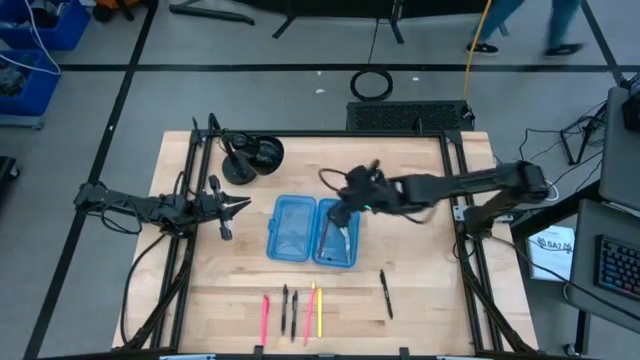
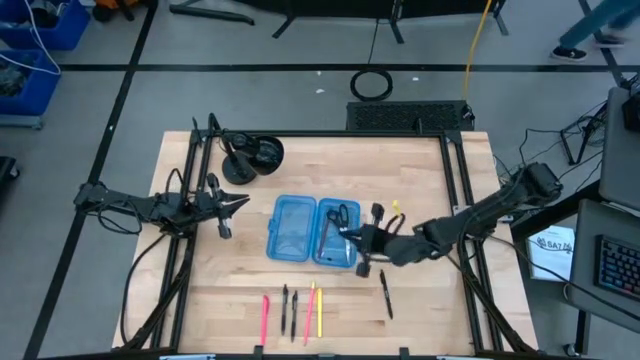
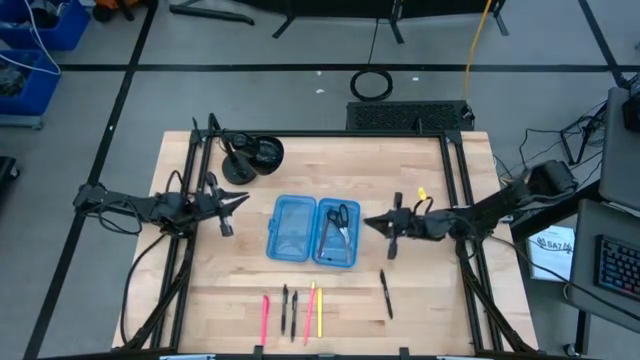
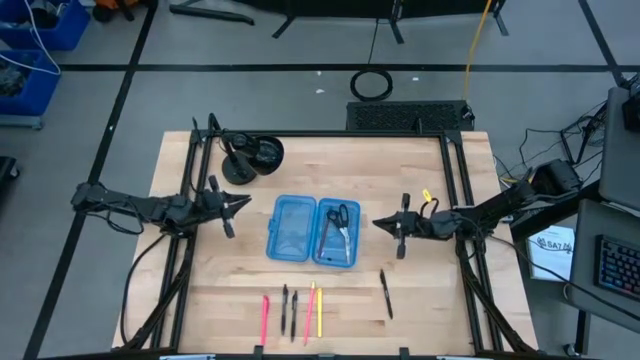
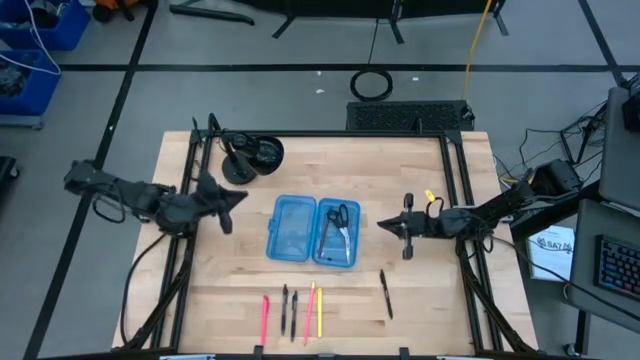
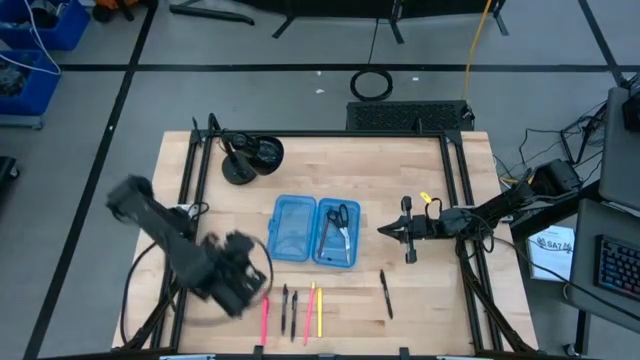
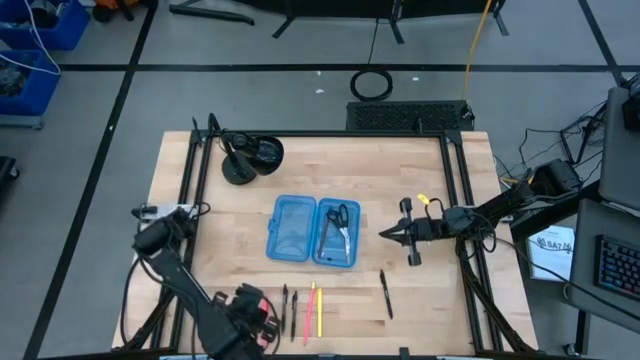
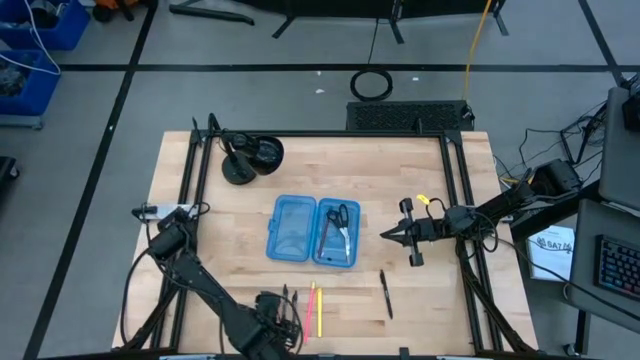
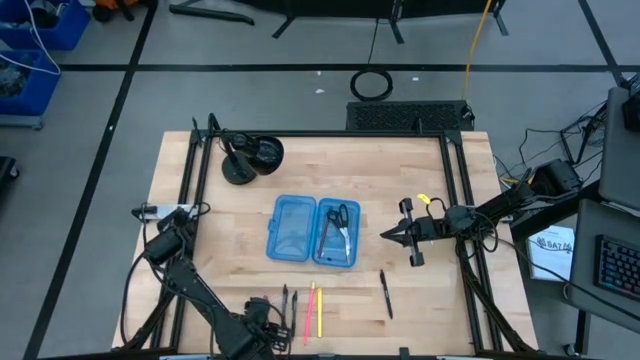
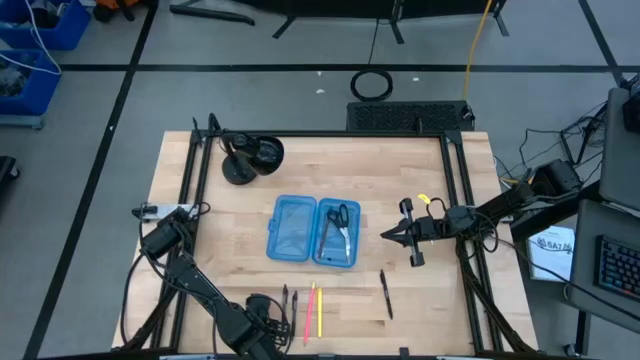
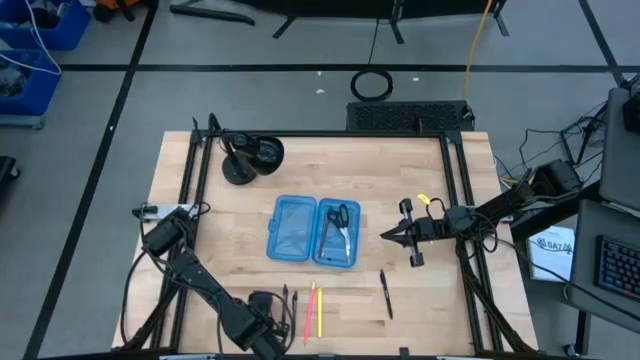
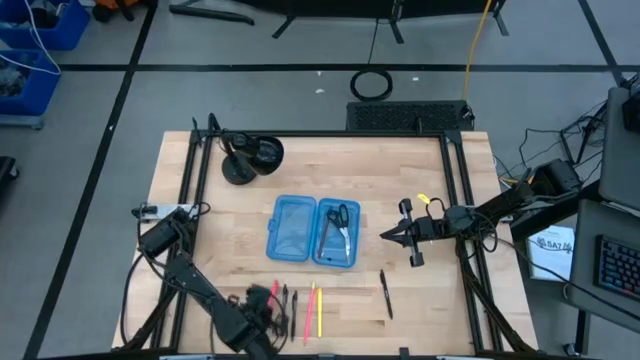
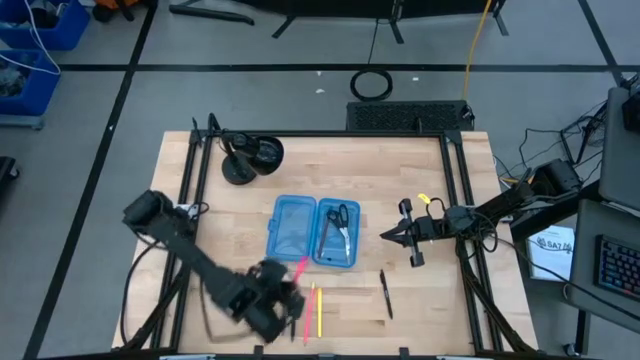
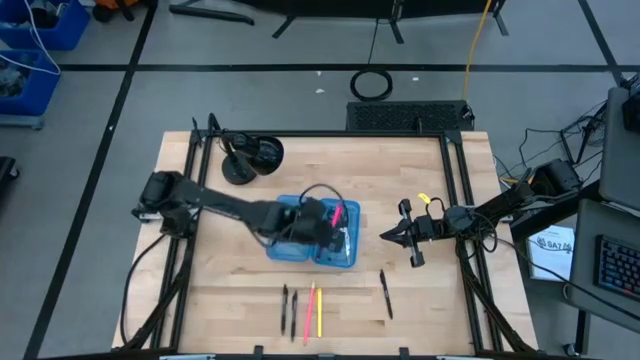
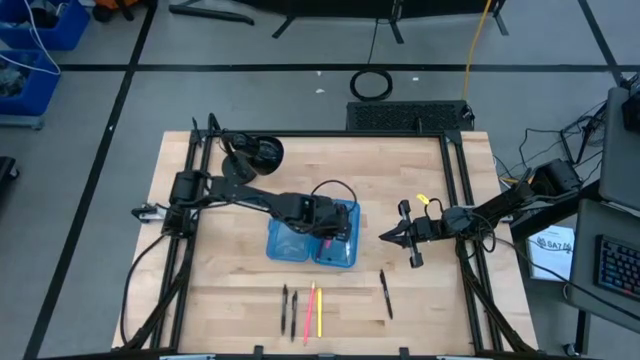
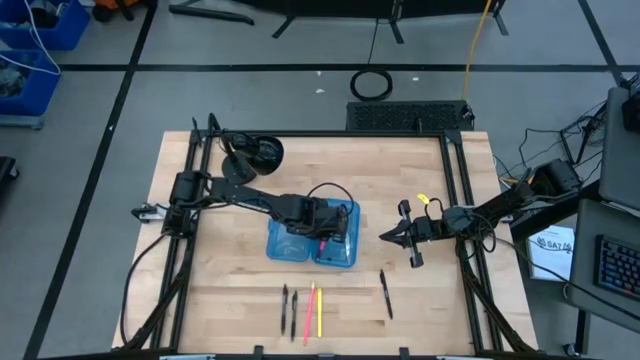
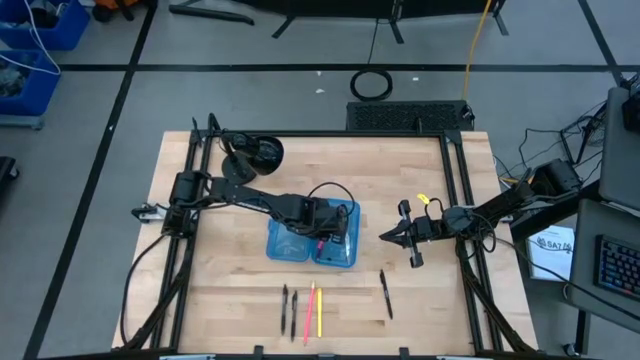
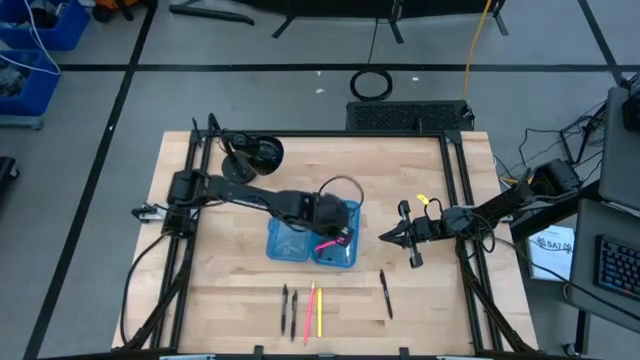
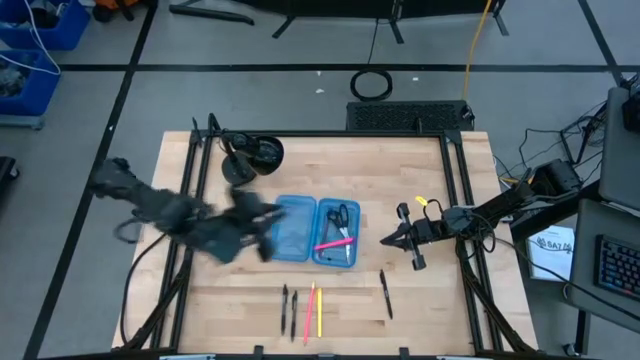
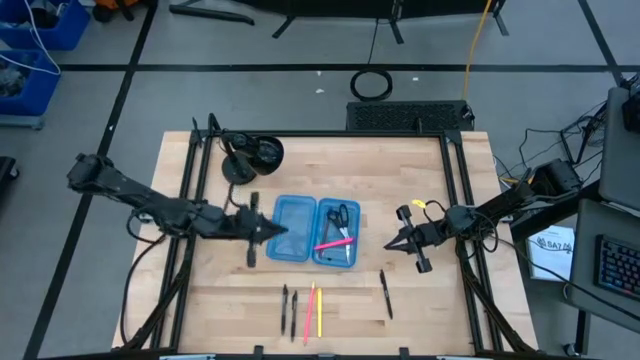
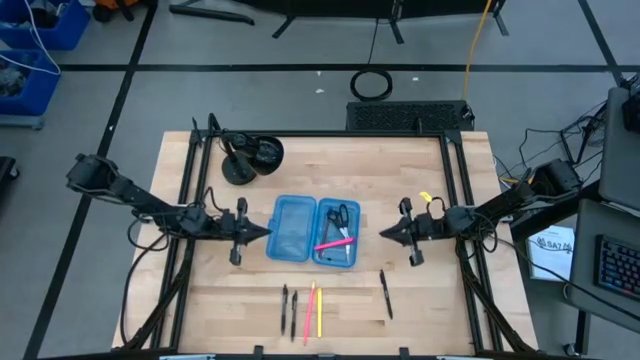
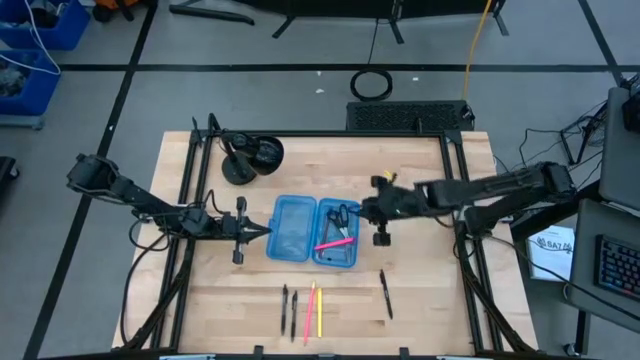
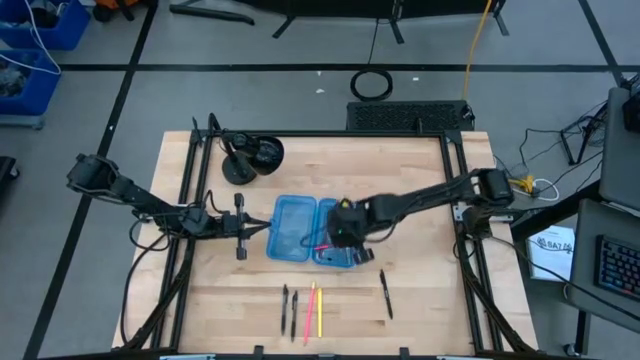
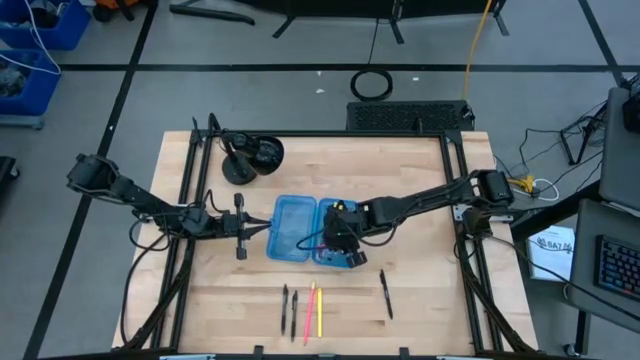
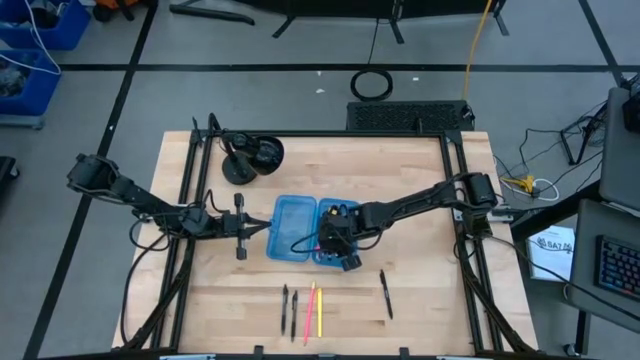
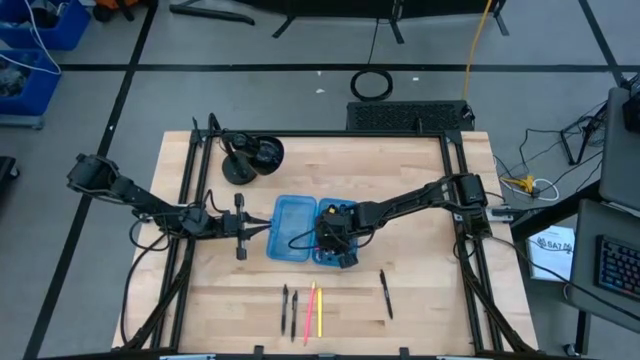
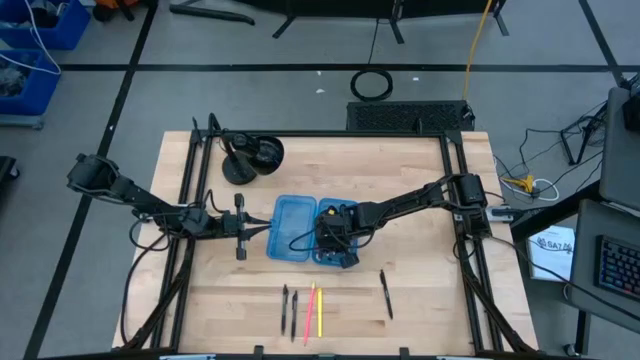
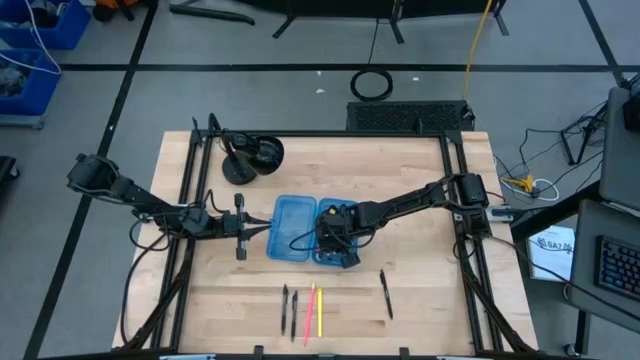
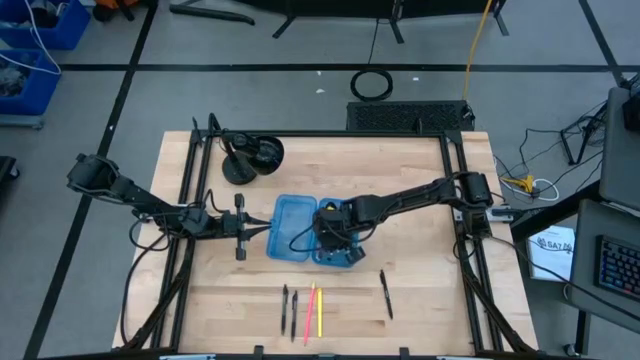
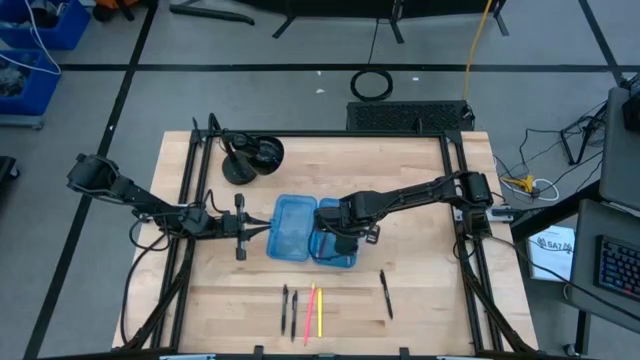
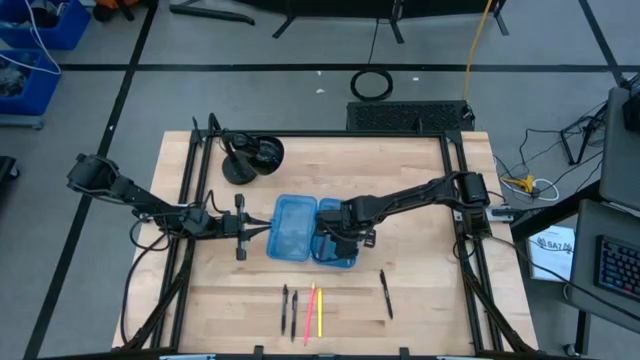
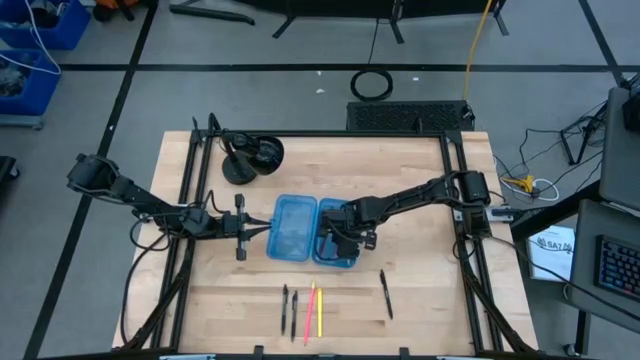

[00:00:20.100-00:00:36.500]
Task: Pick & place school supplies into a supply box
Put the pink pen into the blue box

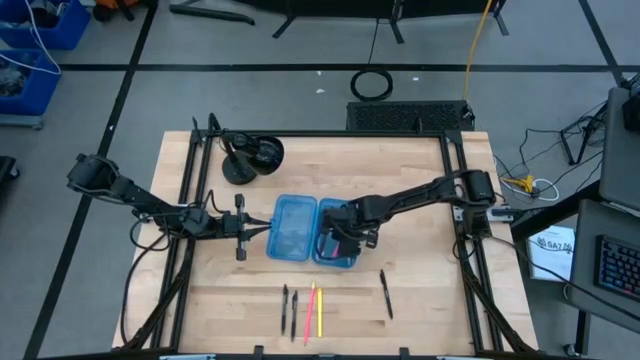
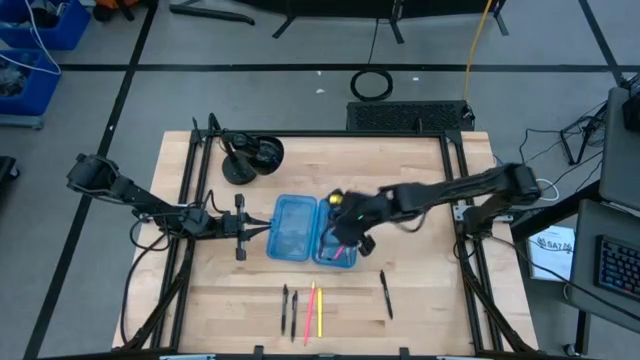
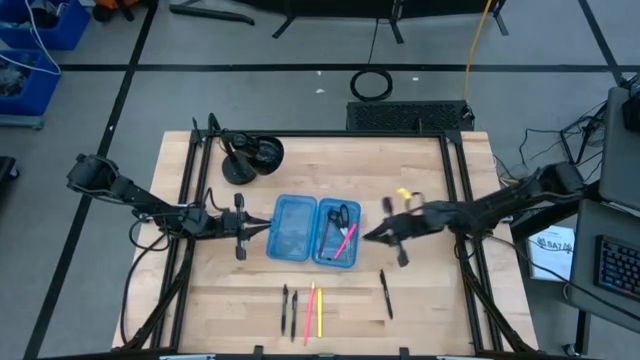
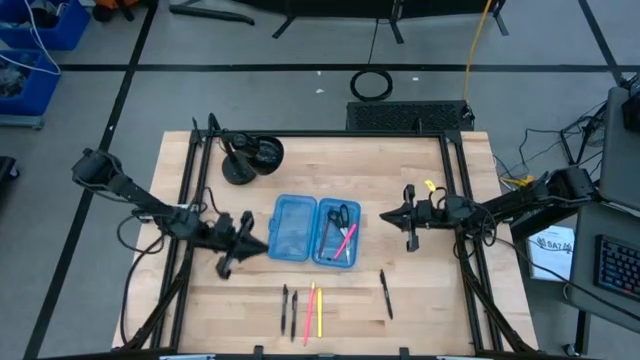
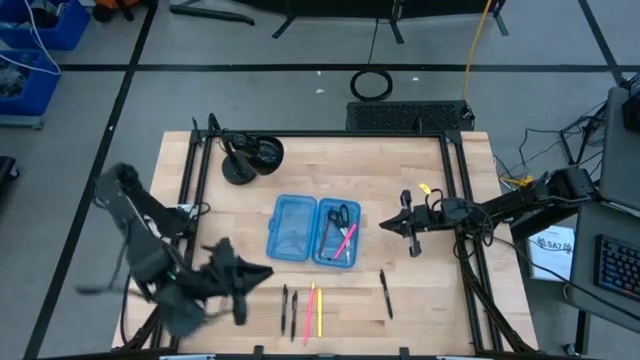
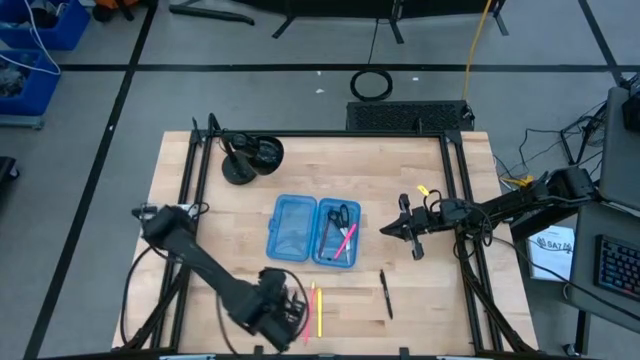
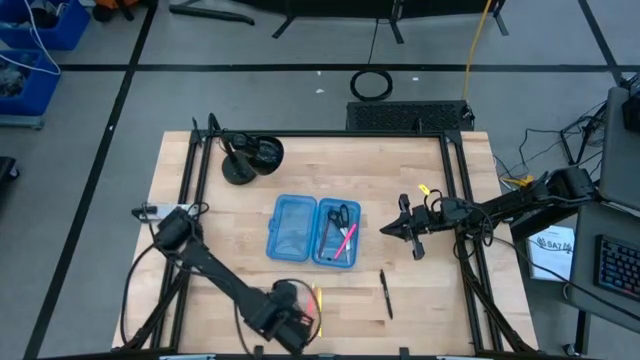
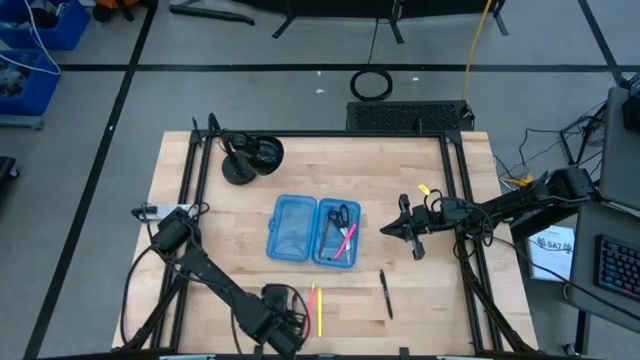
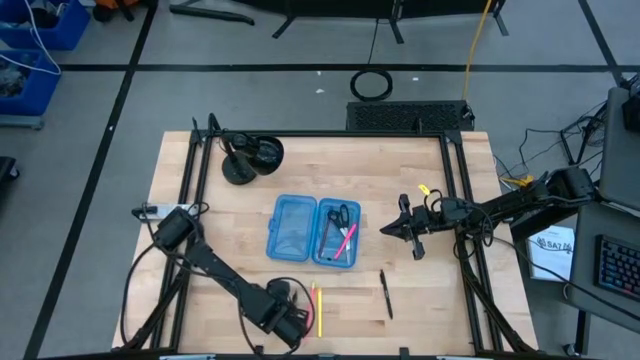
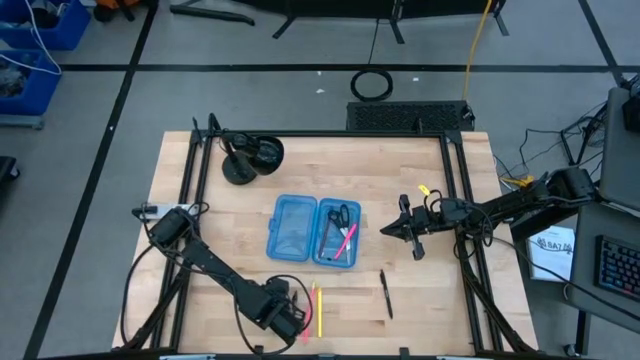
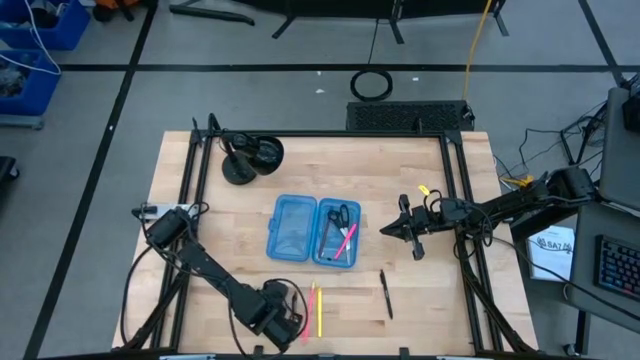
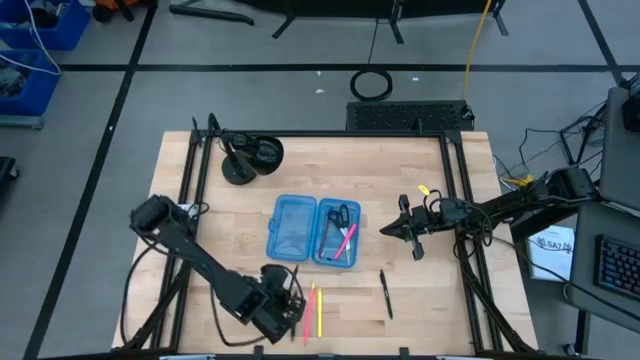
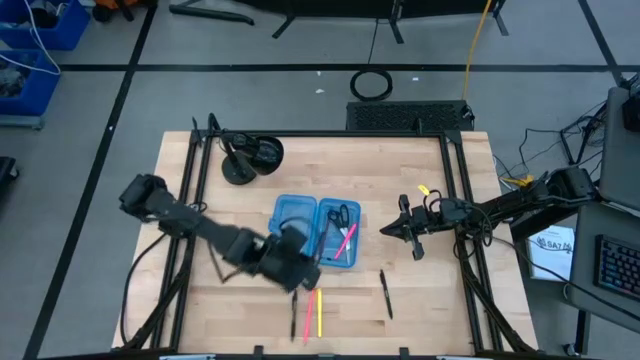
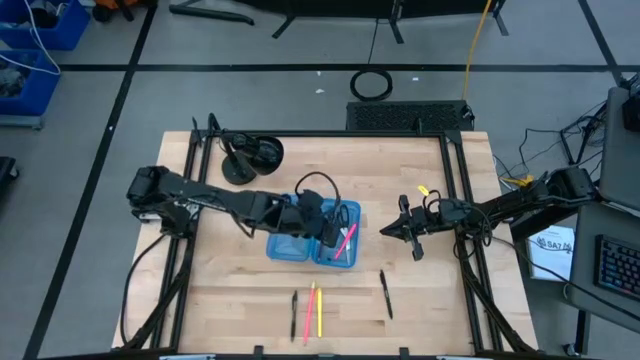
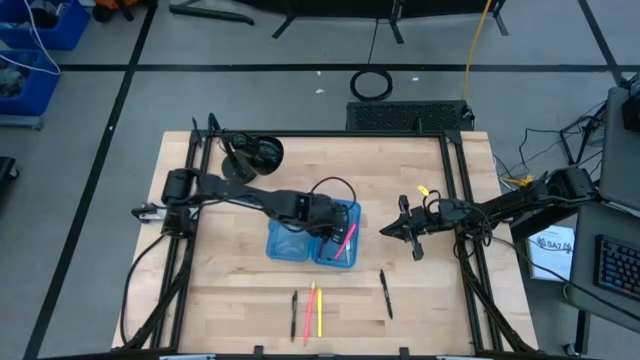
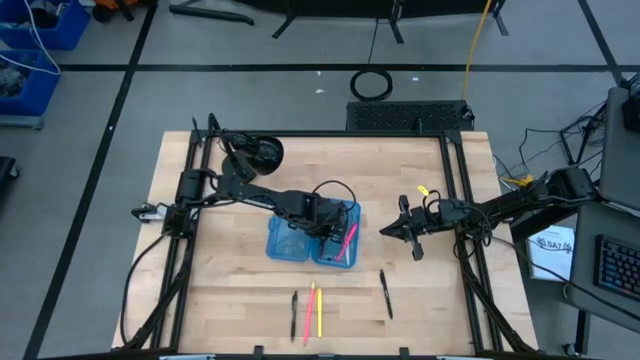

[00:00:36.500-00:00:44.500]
Put the left black pen into the blue box
